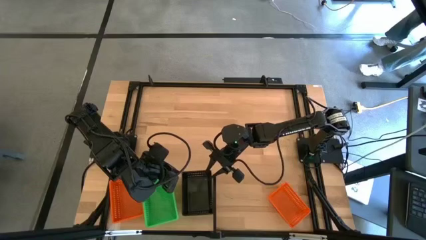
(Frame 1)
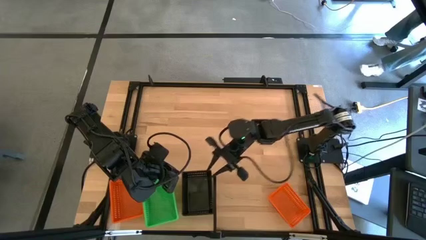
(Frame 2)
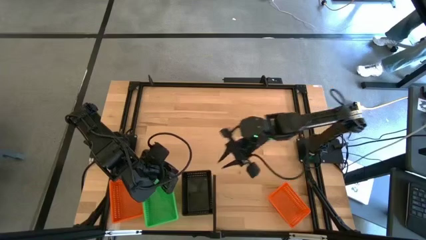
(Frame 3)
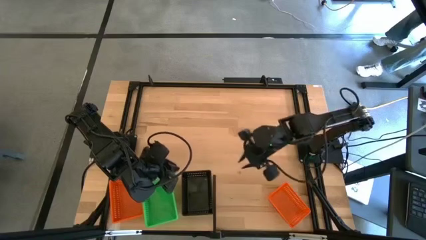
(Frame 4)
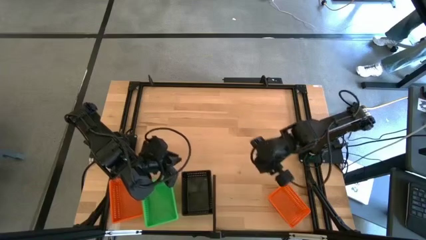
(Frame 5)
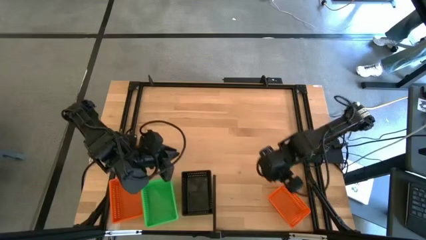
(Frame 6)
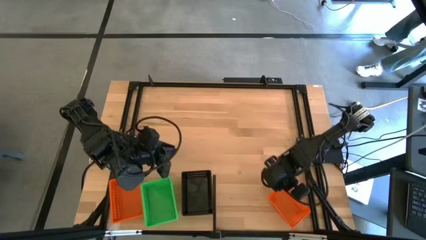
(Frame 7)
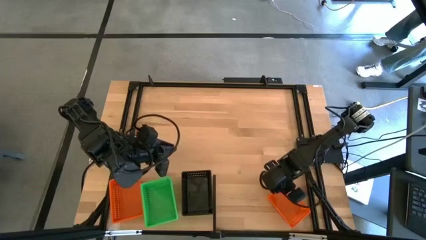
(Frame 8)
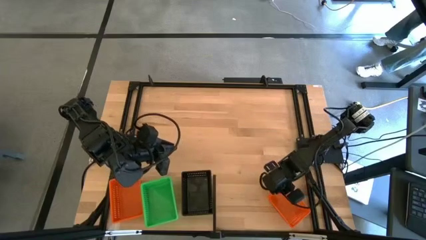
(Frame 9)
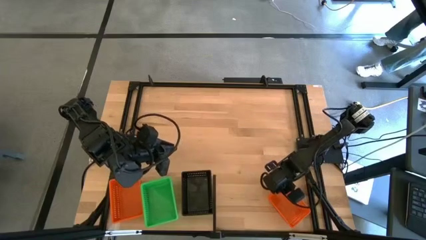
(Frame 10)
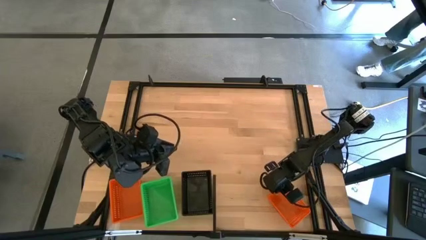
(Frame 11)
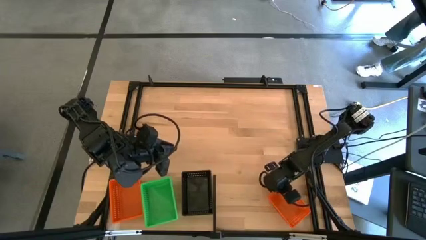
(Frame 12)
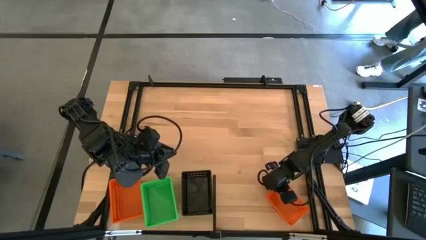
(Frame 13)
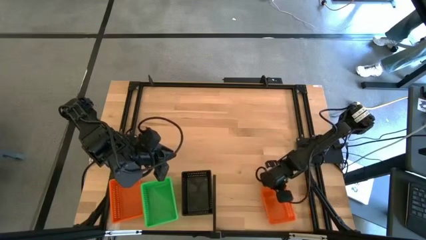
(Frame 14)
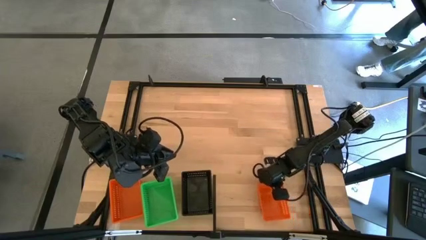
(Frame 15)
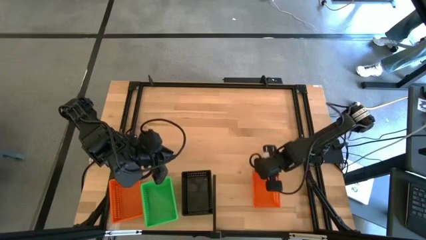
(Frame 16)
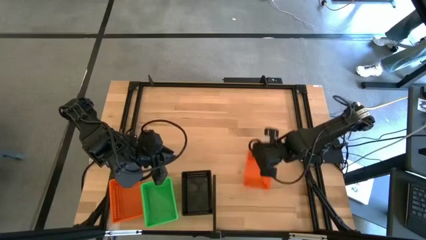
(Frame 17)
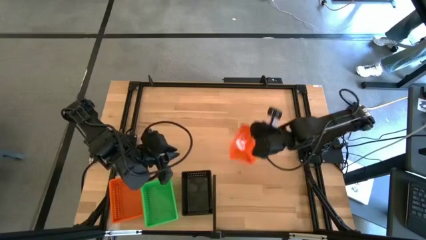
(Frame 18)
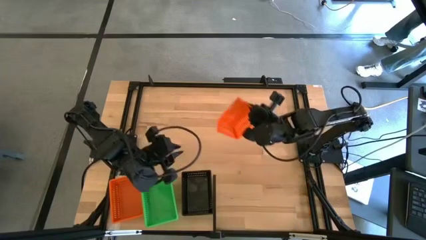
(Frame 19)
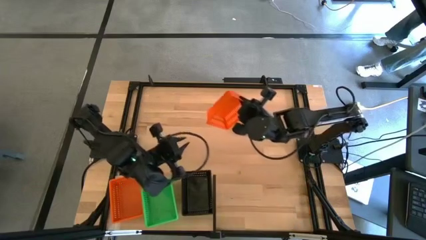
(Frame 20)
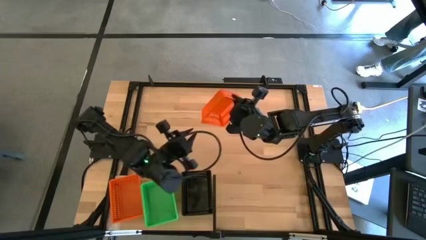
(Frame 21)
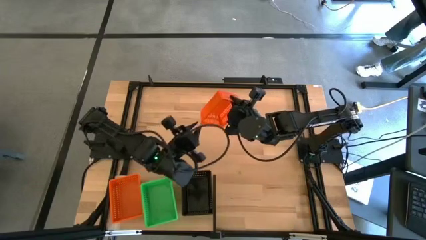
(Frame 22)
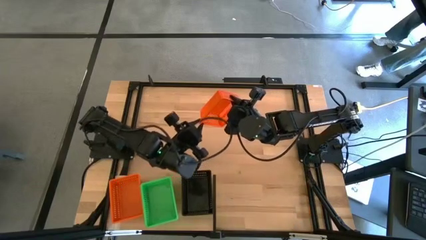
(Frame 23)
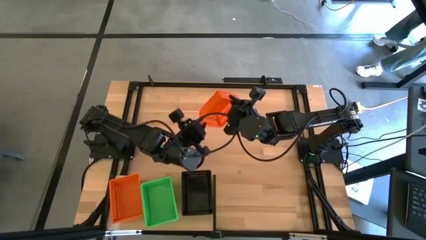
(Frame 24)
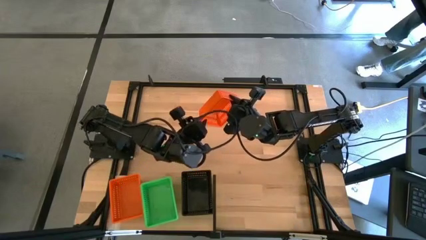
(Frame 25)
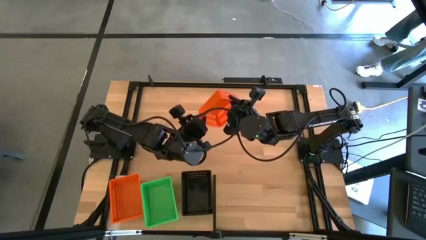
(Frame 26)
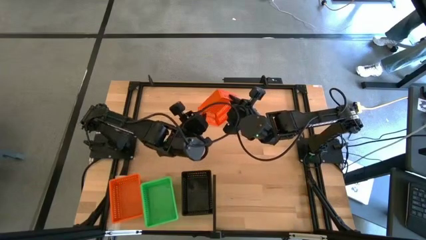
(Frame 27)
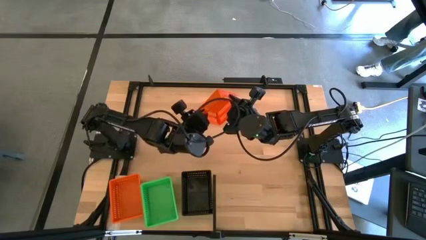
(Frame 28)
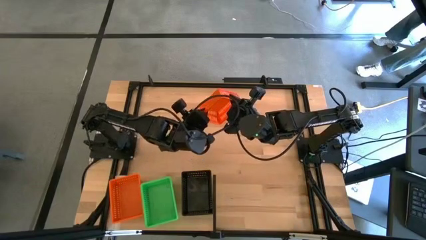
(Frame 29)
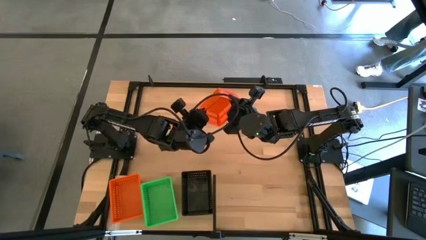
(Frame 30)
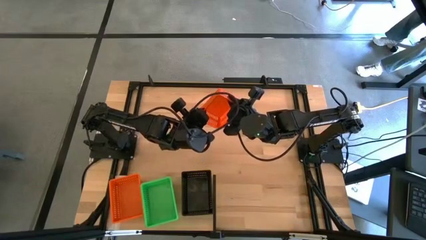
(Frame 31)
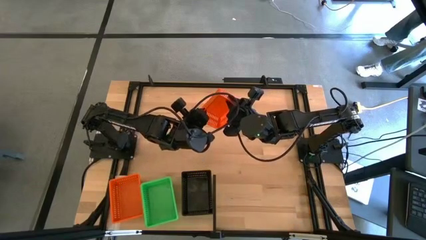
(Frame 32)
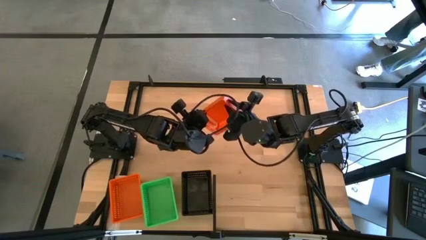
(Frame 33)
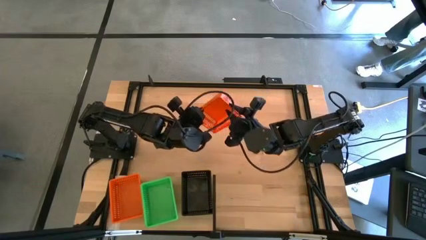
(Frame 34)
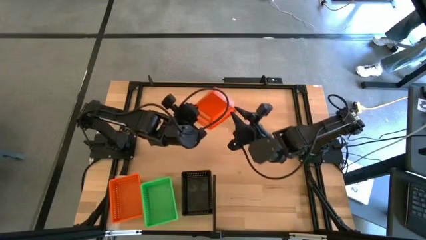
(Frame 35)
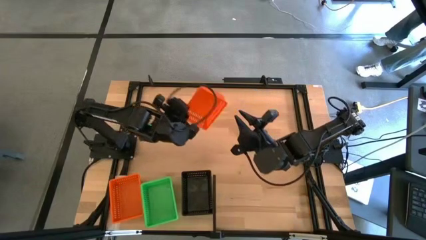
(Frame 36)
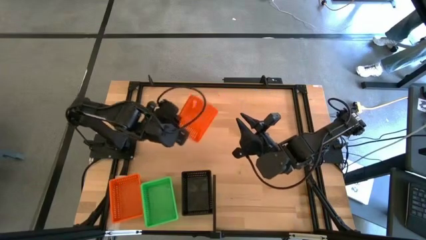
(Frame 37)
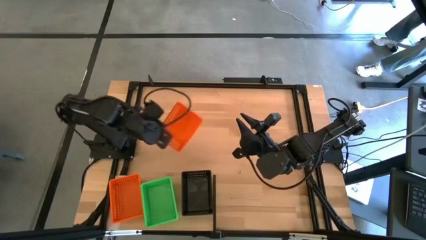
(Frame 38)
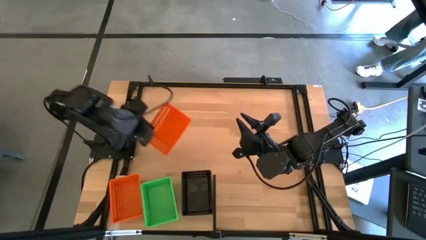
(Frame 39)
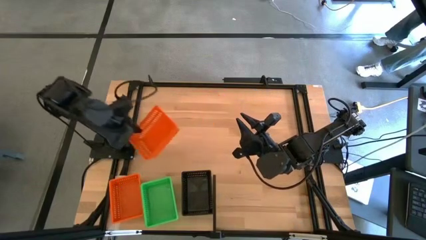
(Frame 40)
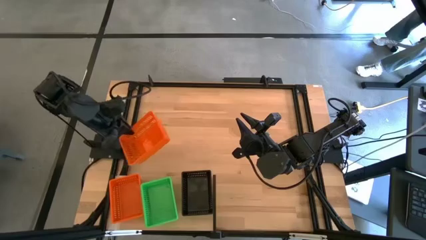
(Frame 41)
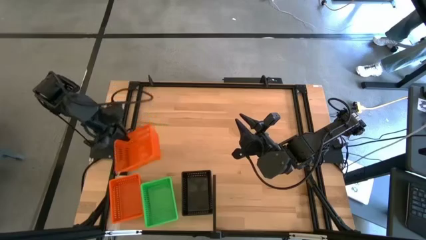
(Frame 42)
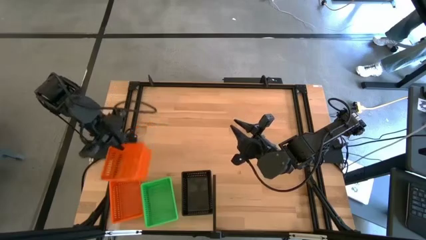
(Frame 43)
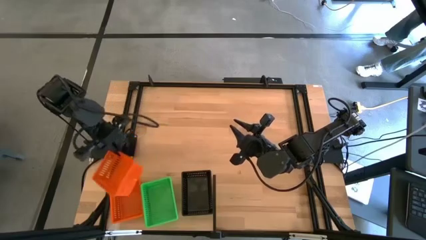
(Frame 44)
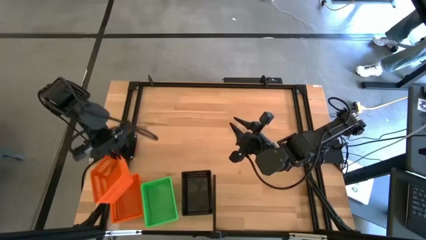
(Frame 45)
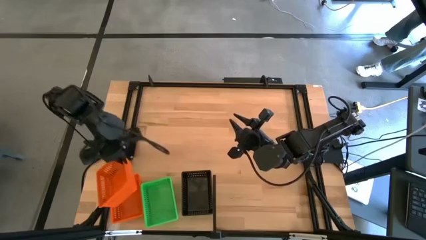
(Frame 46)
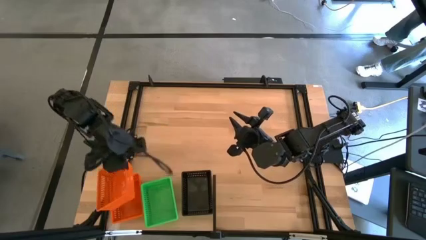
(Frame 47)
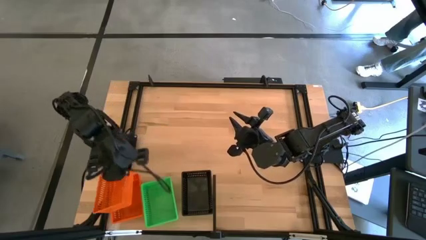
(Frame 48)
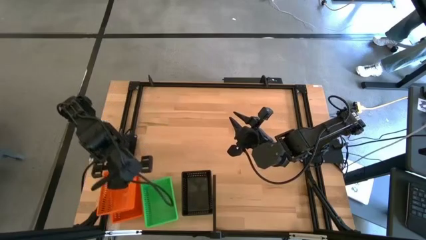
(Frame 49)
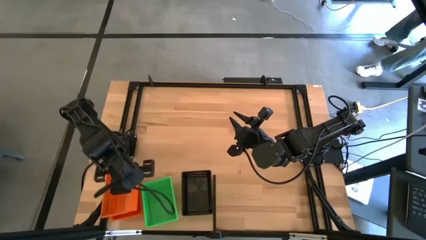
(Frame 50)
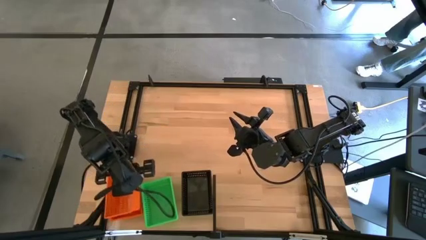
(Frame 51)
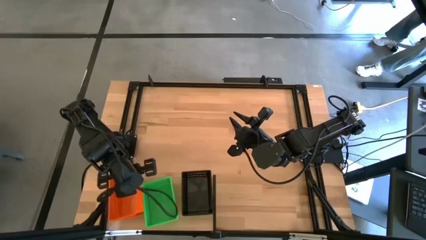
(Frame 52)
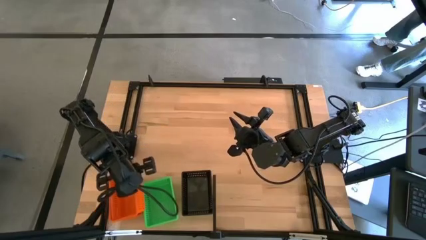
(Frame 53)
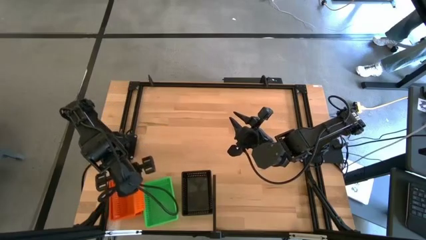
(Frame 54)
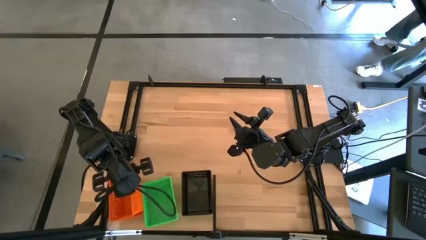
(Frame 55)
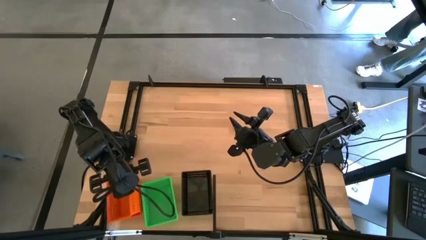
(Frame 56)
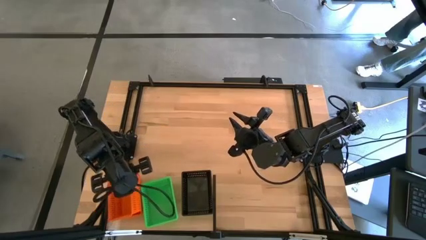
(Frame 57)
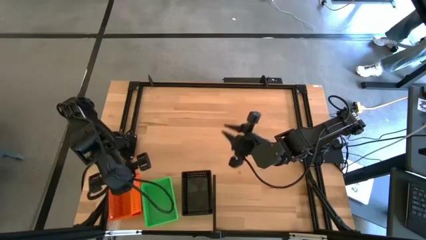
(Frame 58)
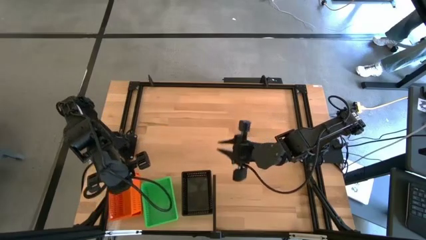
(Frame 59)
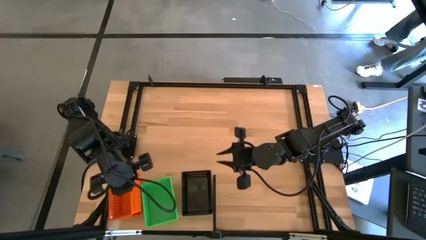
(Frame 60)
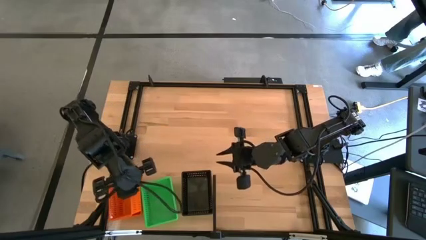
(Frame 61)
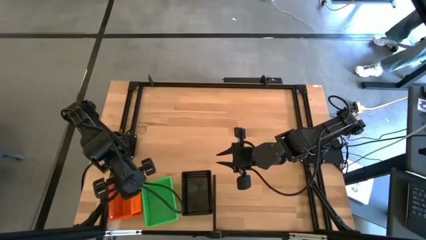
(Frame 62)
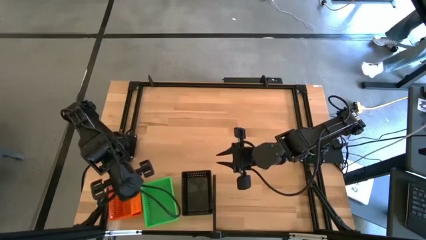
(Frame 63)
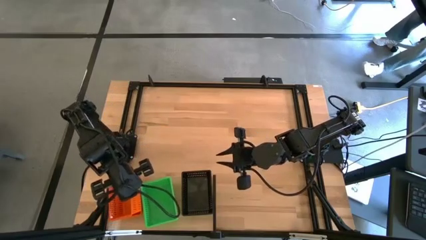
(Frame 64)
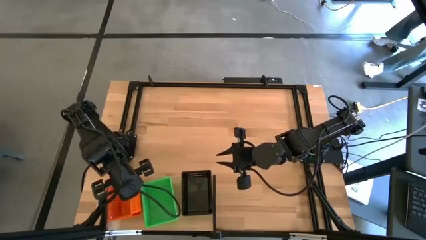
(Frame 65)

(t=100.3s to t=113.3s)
Task: Stack baskets on shelf by color
Stack the orange basket on top of the other orange baskets on the shelf

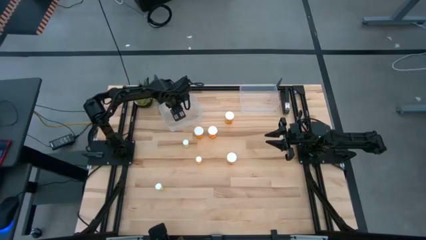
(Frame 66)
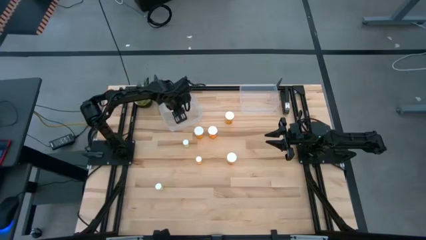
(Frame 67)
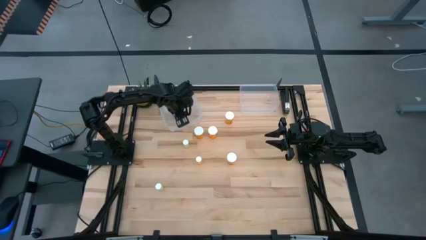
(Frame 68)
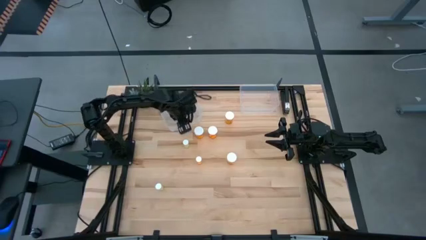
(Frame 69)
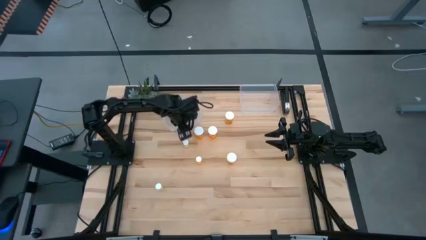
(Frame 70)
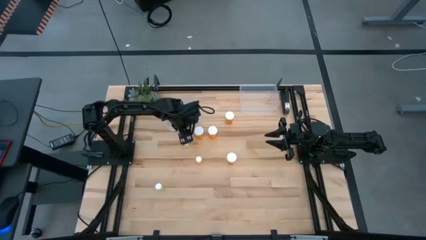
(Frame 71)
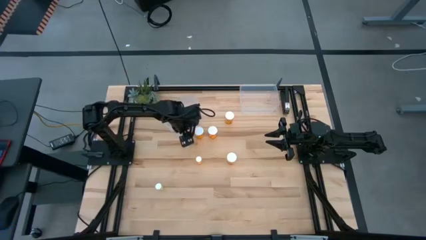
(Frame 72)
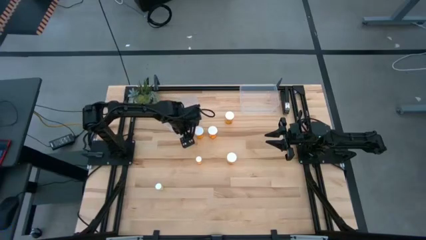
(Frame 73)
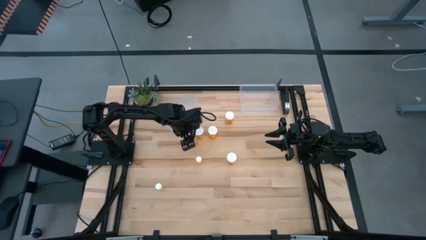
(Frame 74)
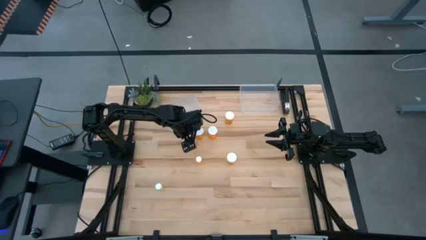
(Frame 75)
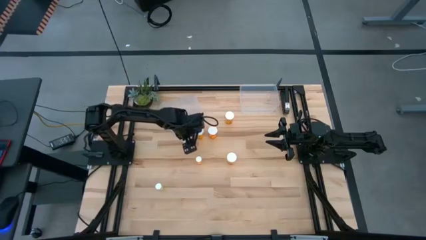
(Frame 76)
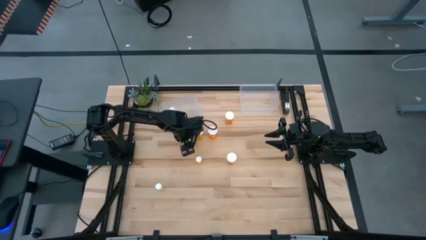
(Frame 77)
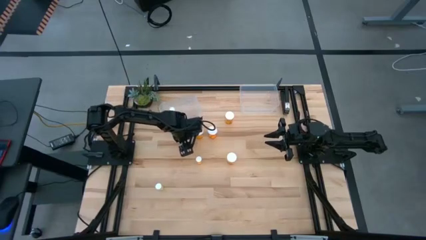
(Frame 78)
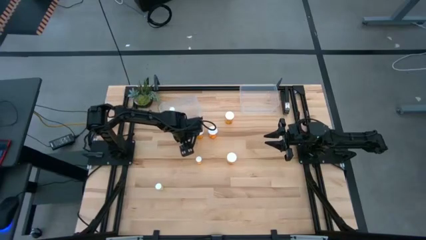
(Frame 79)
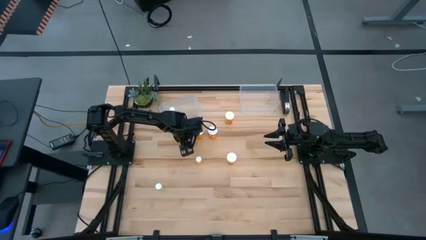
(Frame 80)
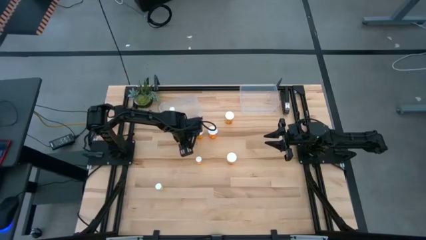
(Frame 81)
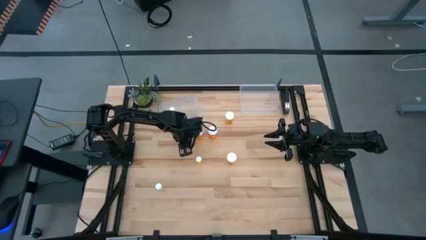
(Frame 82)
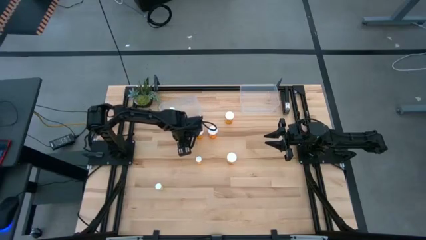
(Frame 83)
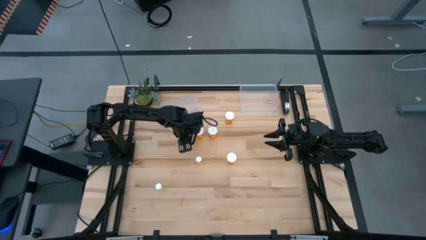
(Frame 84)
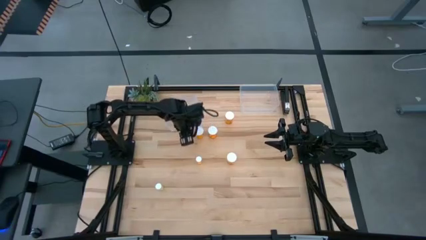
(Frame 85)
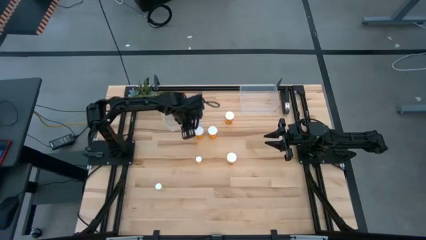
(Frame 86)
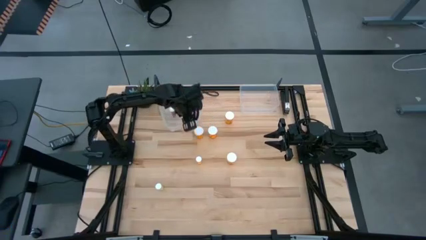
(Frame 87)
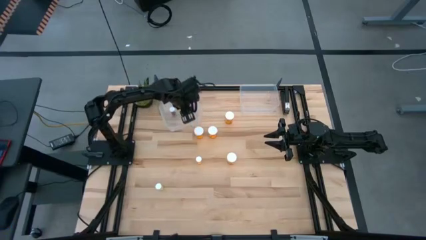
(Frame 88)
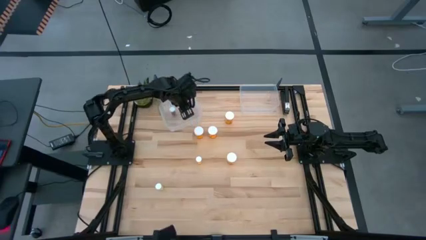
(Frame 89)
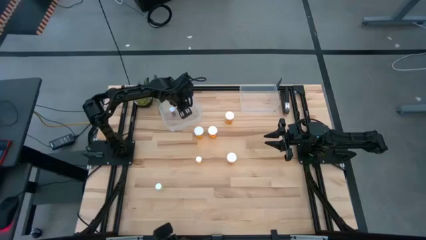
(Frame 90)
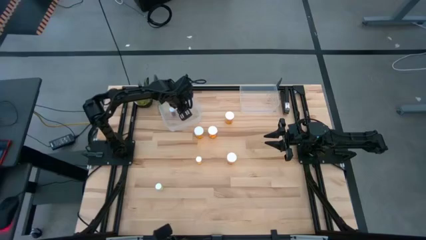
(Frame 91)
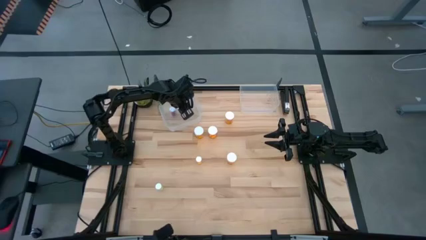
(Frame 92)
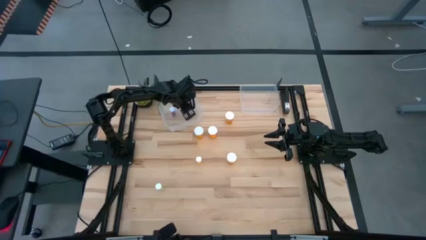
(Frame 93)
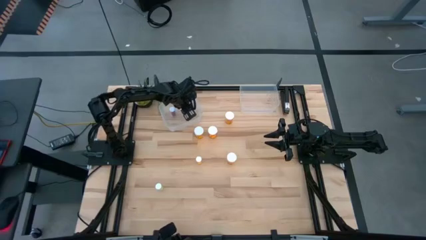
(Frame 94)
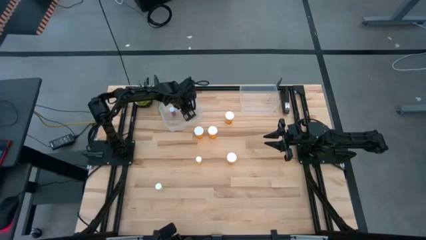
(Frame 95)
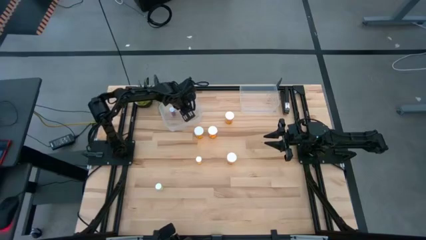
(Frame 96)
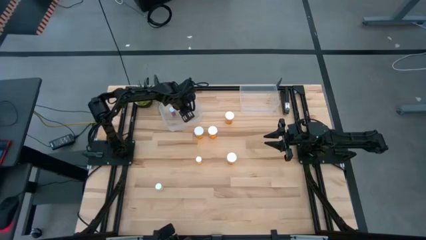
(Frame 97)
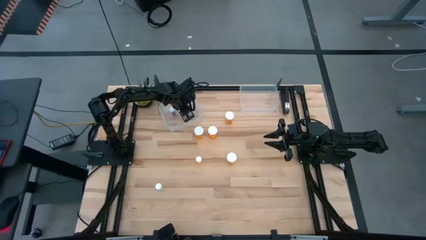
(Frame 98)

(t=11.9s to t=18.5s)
Task: Pick and place medicine bottles into bin by pill shape (circle, oval)
Put the yellow small pill bottle into the left transparent bin
